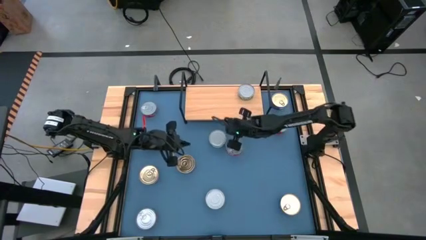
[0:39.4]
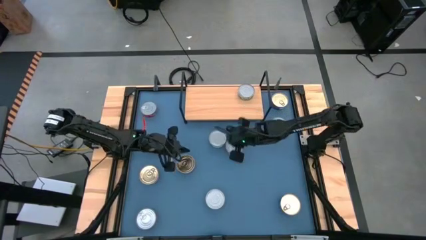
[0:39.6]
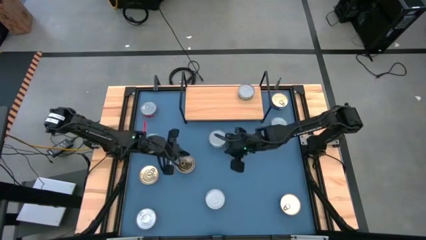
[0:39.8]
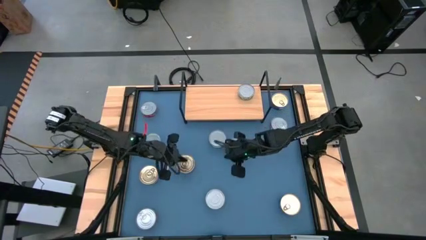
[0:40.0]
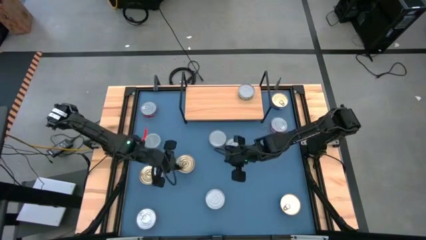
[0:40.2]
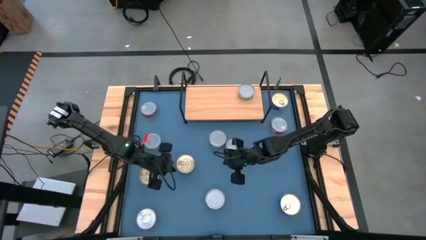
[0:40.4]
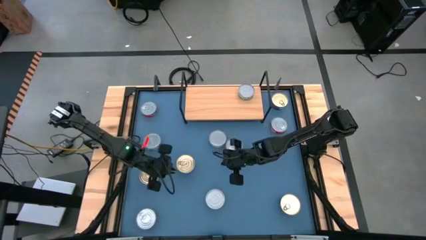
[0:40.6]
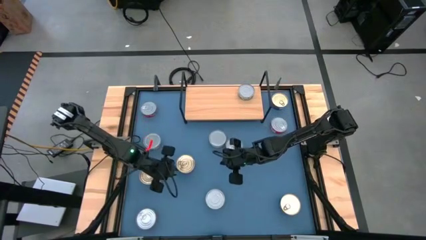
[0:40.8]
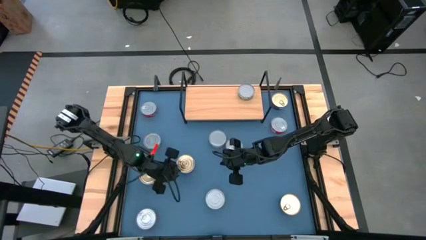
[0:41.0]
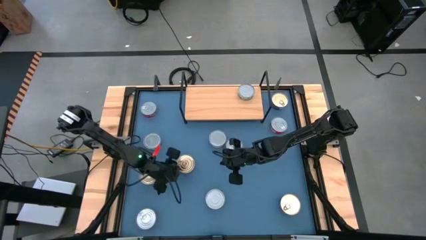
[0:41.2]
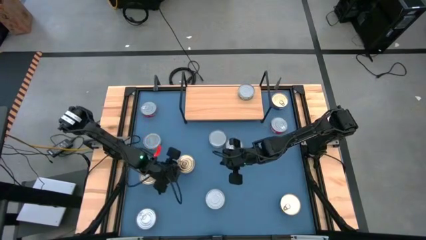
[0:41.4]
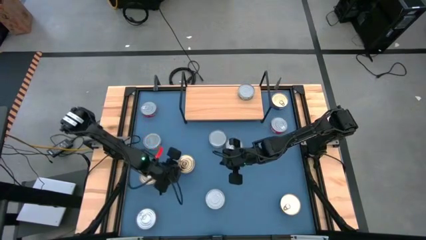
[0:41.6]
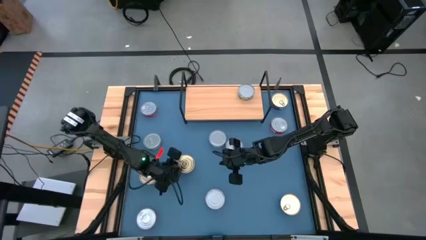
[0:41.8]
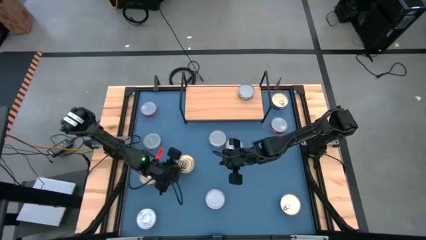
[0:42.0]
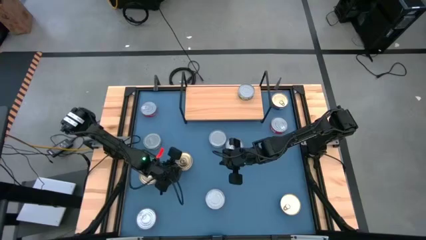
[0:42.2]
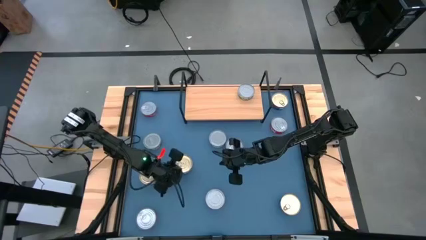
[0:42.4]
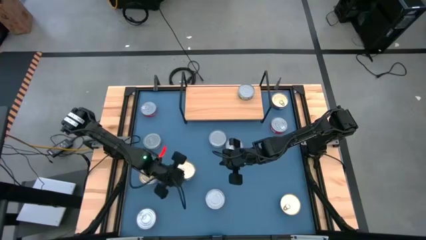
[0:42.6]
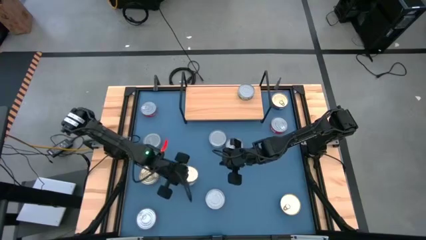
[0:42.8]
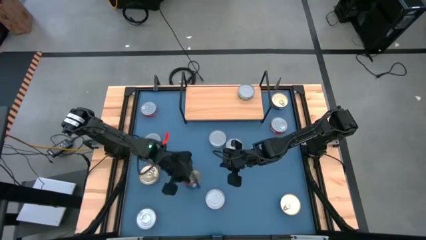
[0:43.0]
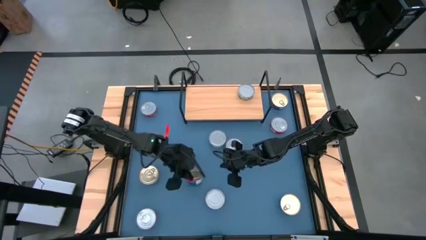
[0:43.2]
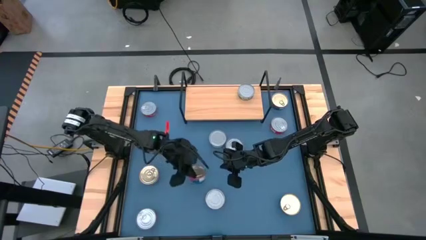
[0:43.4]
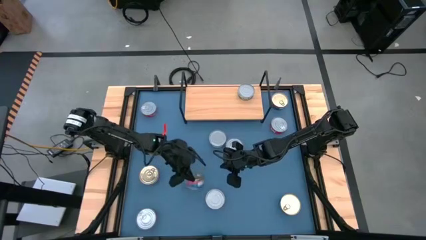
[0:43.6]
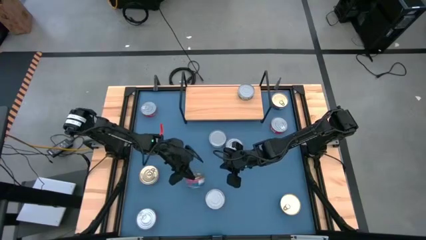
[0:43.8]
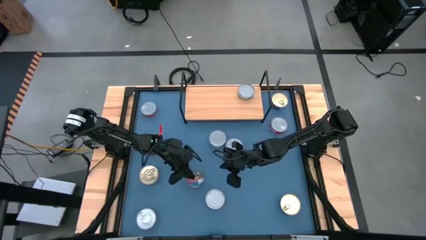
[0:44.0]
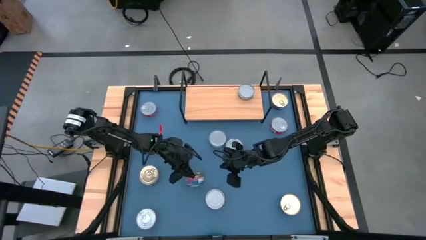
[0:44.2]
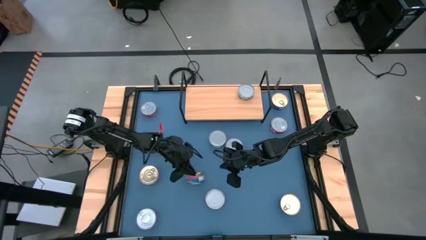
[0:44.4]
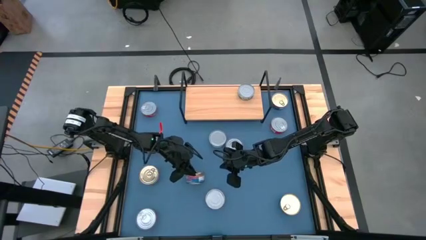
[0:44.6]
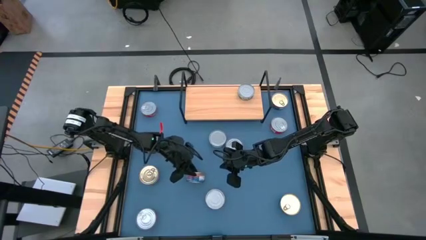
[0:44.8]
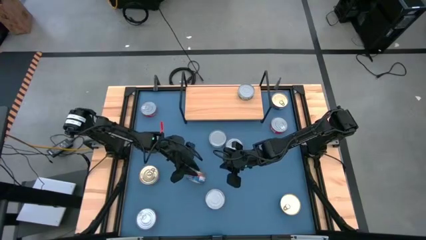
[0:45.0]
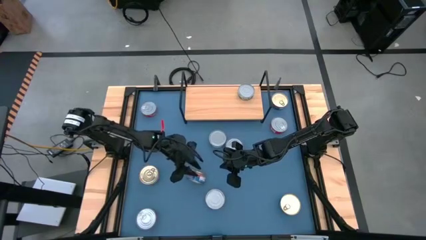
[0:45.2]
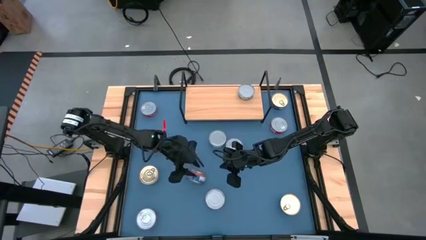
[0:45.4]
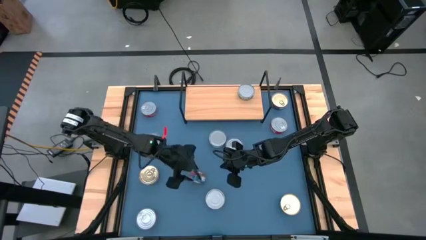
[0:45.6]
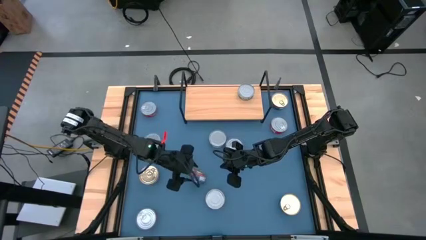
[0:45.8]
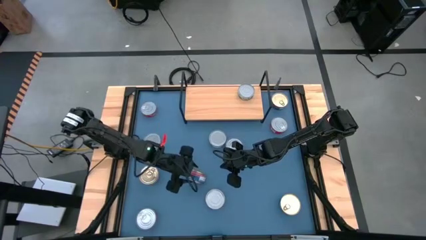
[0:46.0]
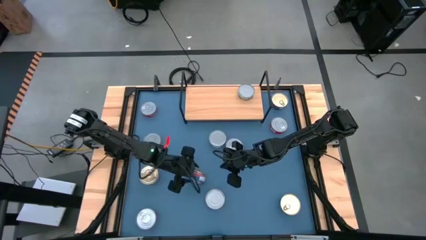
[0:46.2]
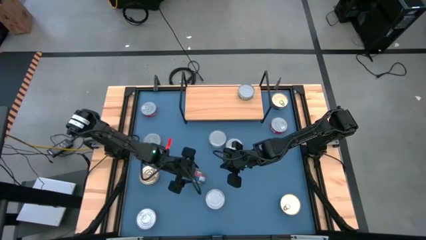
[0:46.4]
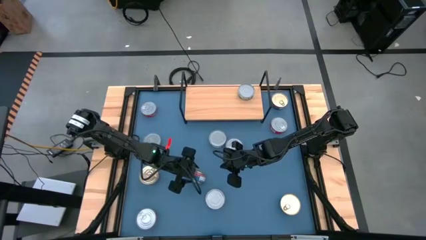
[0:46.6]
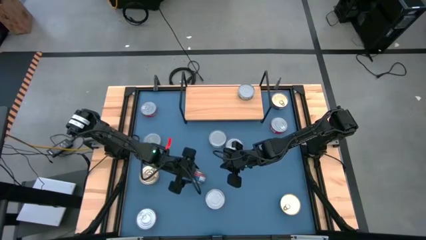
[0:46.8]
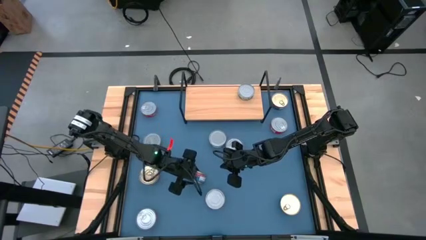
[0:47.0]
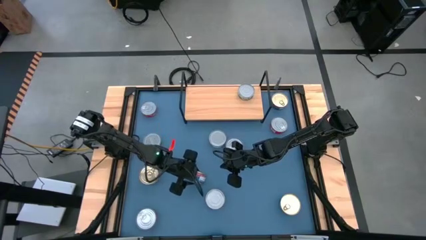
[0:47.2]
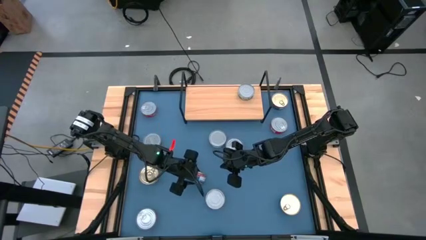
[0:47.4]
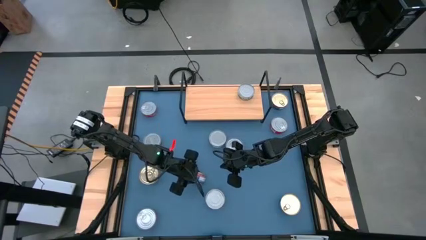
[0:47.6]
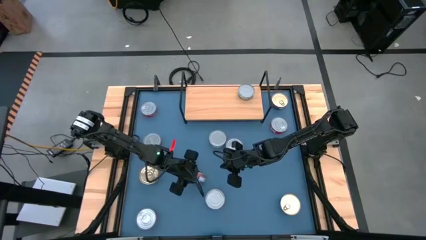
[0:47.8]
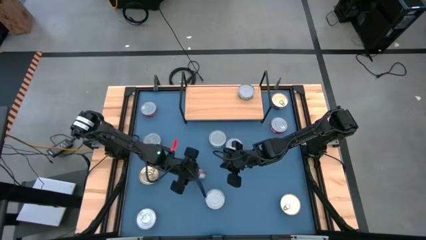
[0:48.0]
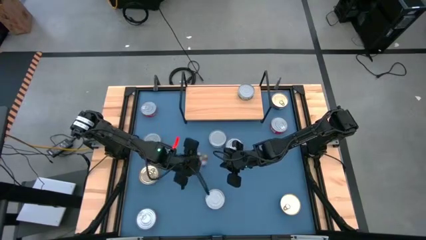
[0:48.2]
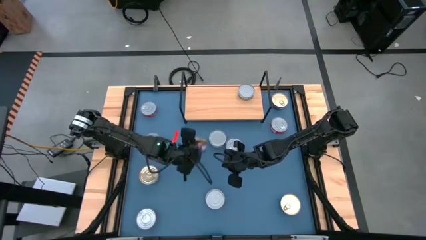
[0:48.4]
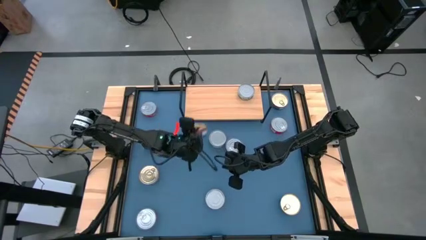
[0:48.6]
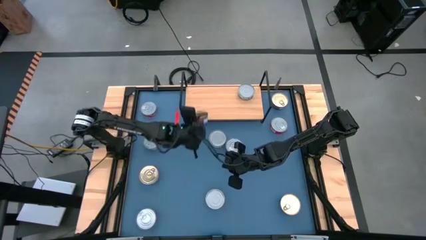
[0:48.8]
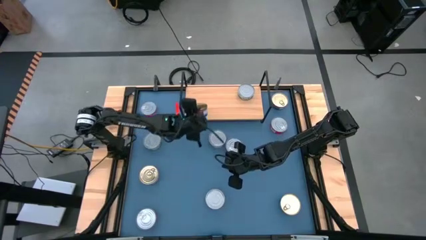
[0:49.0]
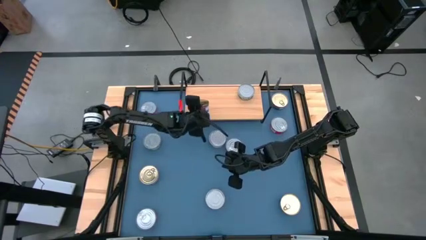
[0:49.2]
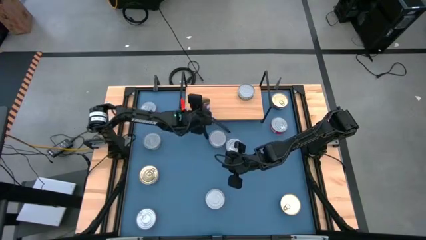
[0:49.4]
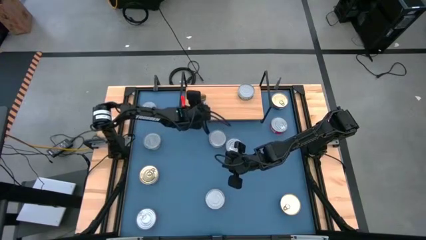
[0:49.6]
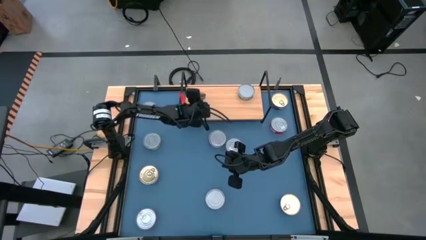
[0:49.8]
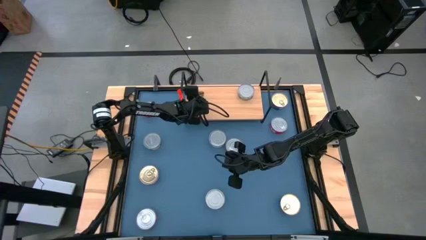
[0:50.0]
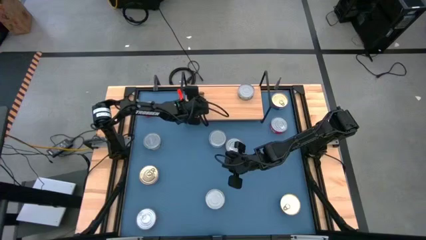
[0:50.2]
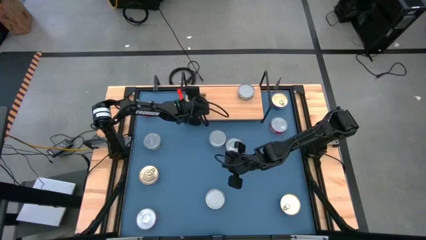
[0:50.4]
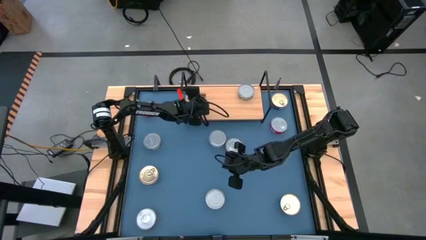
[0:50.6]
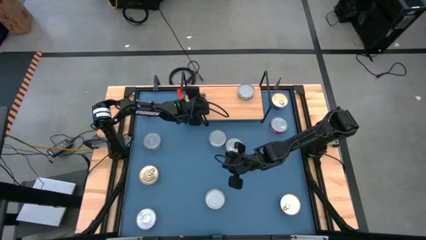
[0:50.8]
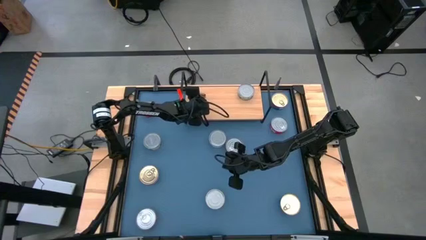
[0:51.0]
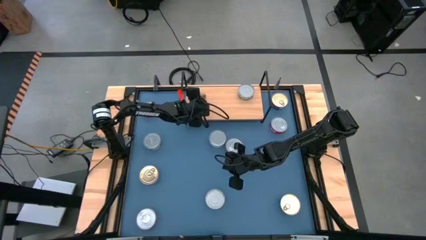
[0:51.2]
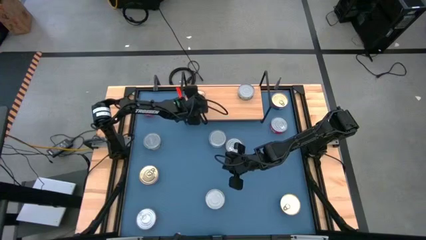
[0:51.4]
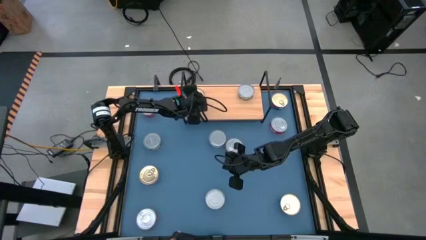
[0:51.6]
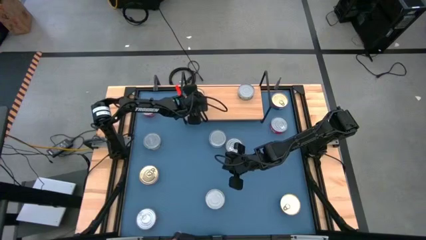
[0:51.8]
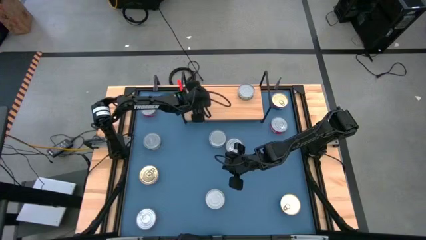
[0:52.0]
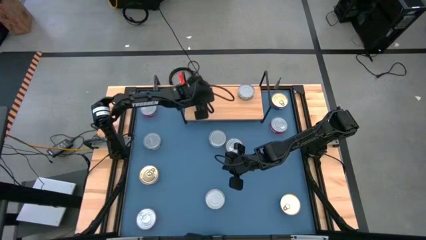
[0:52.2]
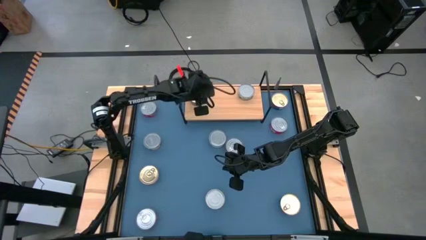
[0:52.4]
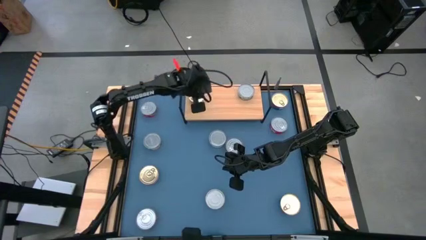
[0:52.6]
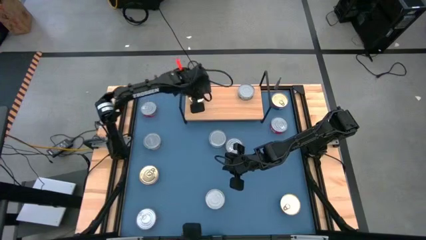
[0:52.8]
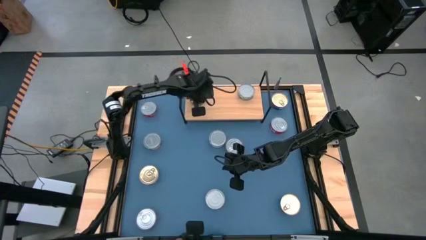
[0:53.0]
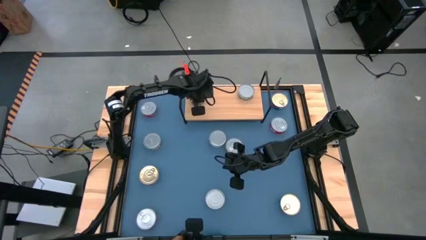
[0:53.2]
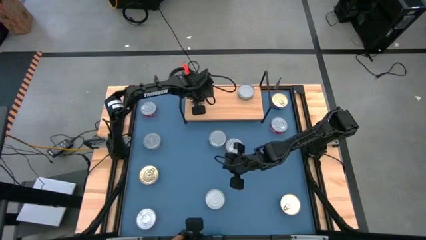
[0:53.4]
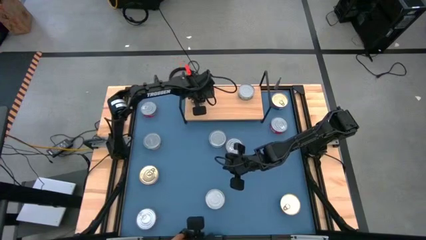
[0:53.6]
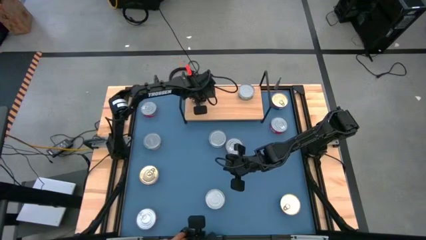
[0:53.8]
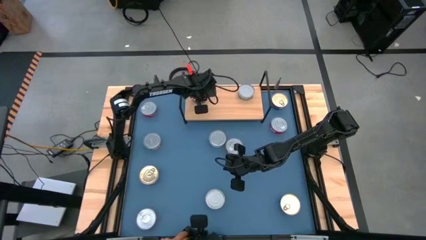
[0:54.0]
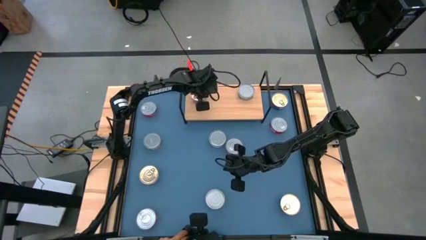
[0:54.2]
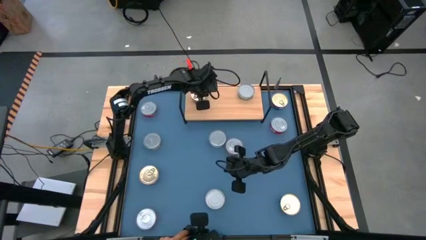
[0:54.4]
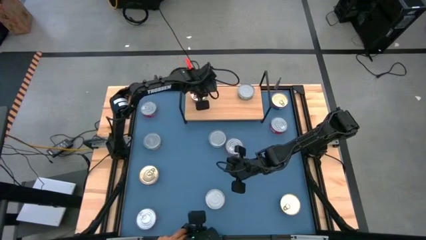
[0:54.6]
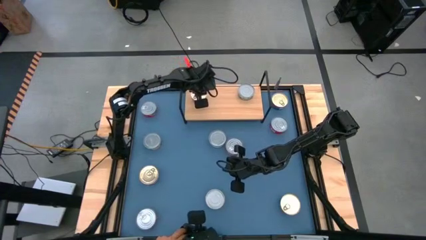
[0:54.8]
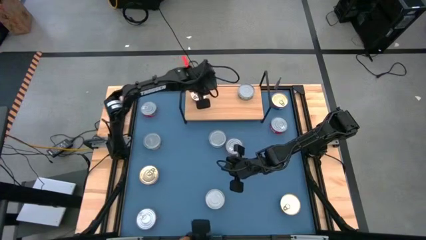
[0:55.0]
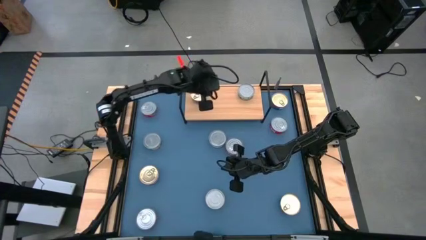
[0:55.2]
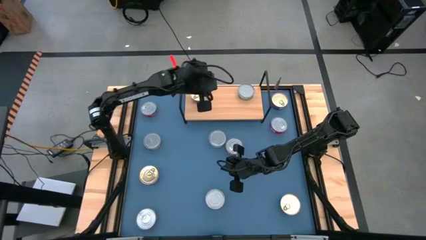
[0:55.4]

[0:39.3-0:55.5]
Task: Stack canned seafood by type on shelf
Put the blue tuna can on the shelf
